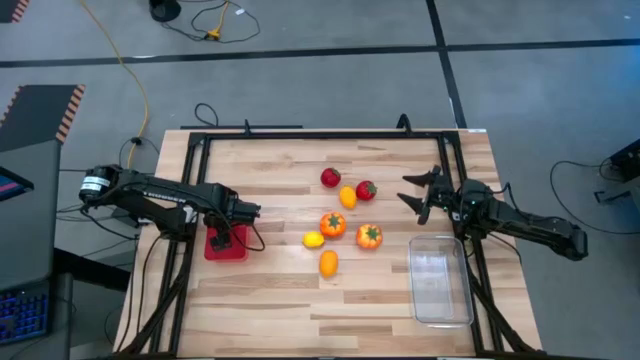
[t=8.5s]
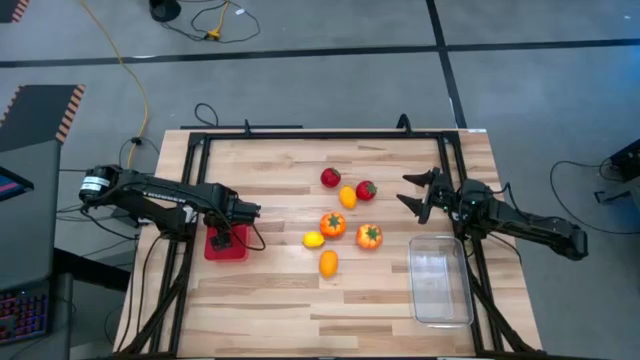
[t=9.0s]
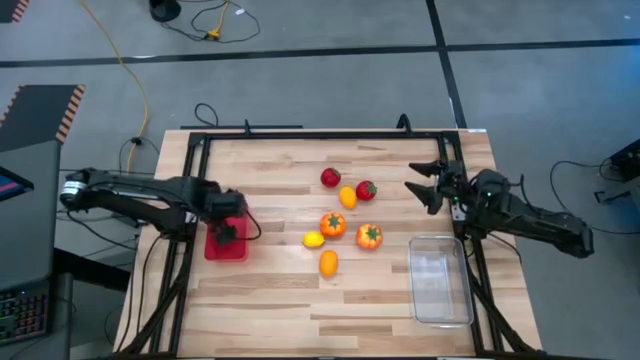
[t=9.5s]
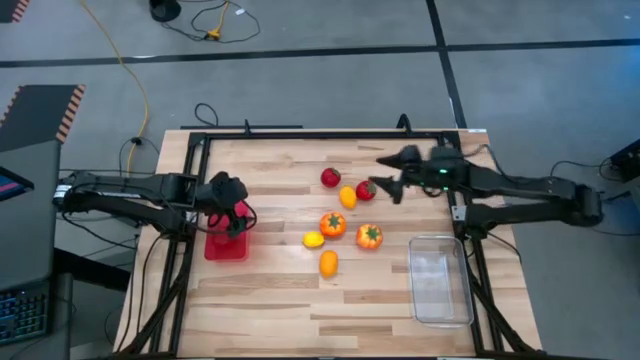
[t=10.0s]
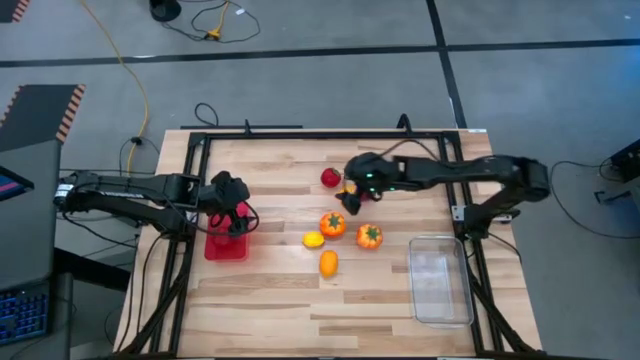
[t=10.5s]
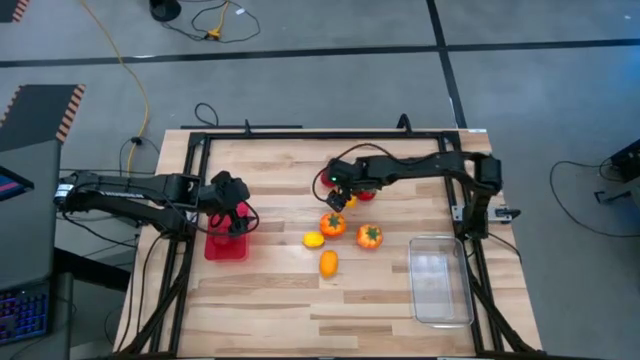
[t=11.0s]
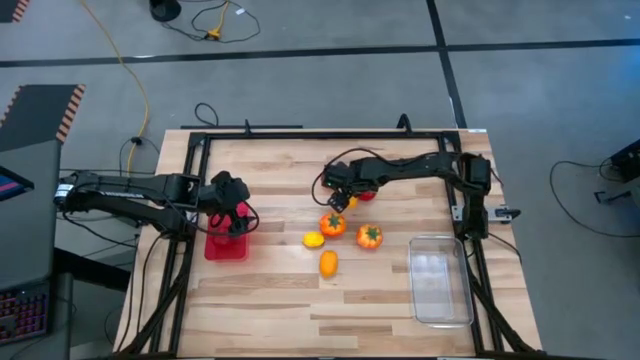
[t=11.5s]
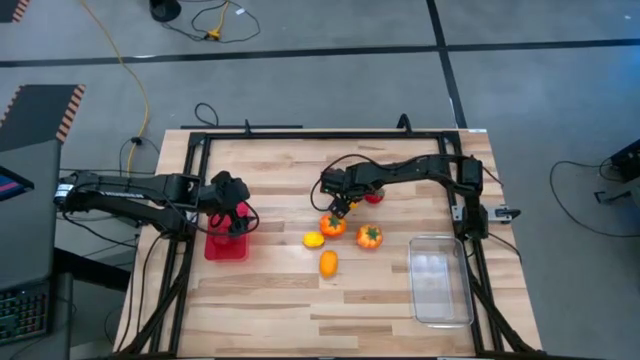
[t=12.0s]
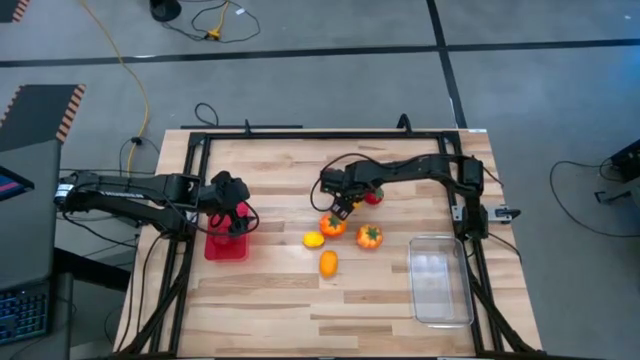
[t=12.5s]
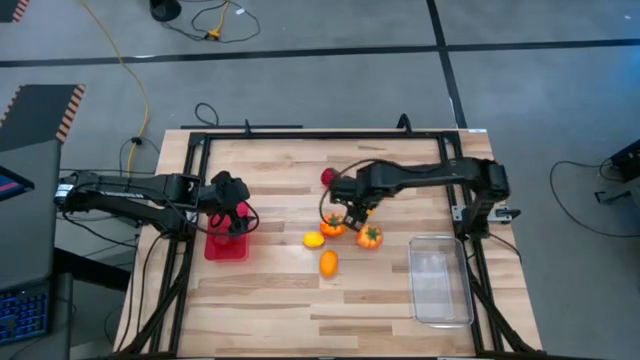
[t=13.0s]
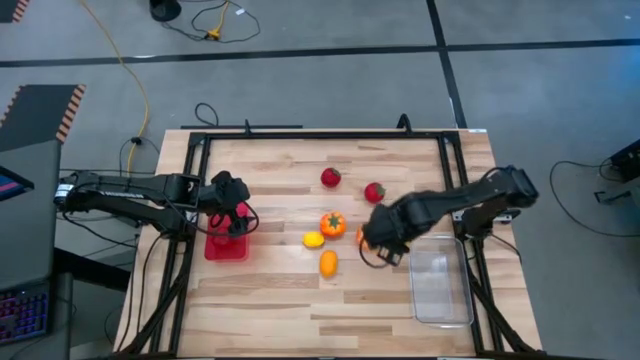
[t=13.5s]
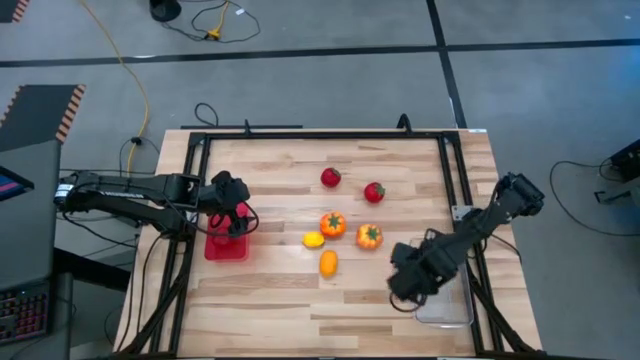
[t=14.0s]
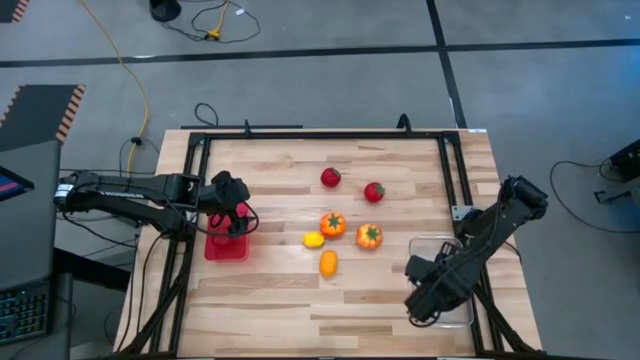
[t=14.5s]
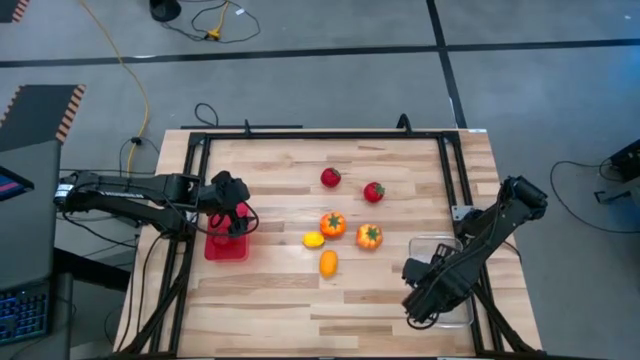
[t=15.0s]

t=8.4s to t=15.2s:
Task: Sort produce into baskets
Put the top yellow lemon into the transparent bin

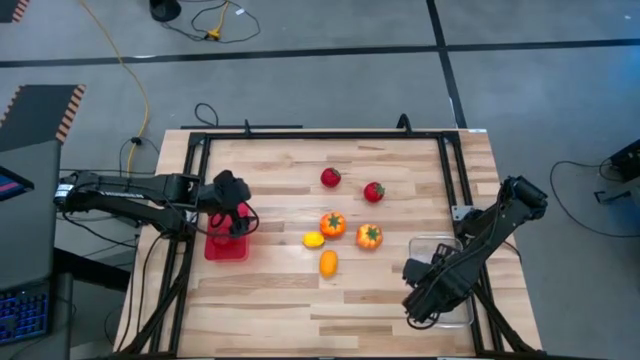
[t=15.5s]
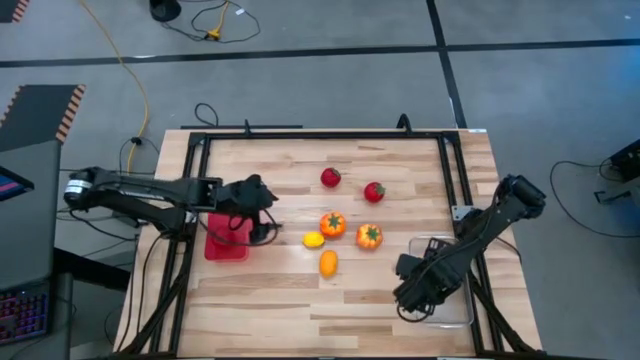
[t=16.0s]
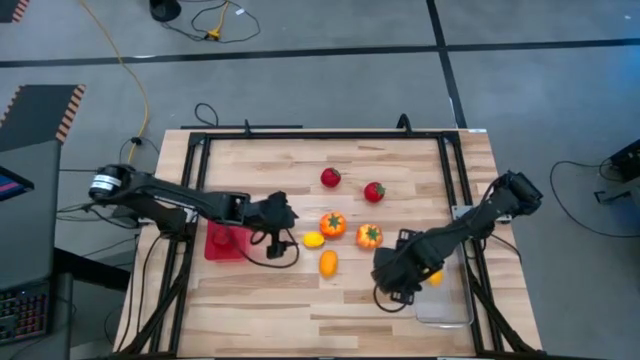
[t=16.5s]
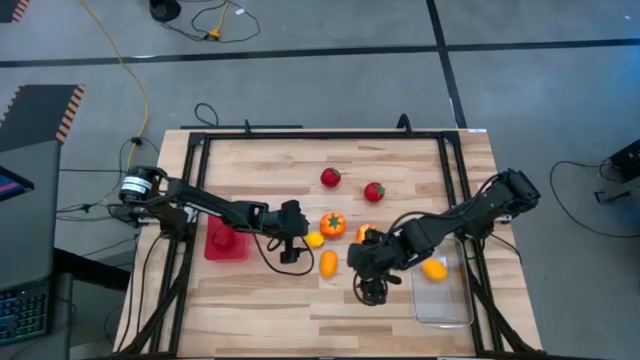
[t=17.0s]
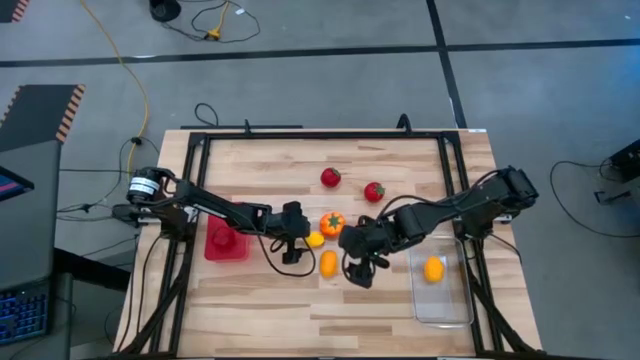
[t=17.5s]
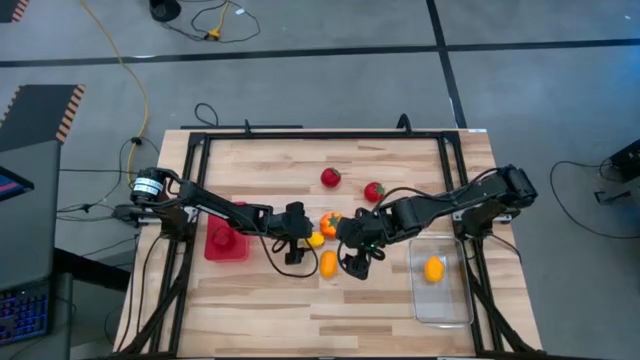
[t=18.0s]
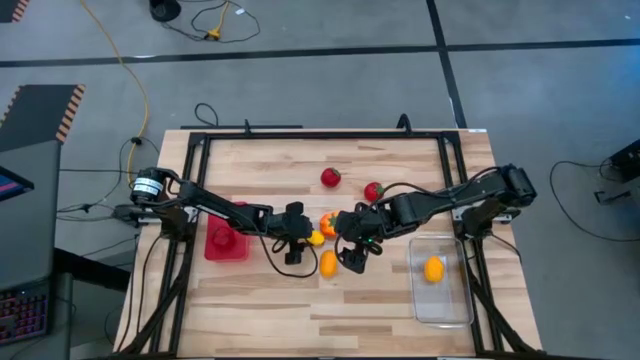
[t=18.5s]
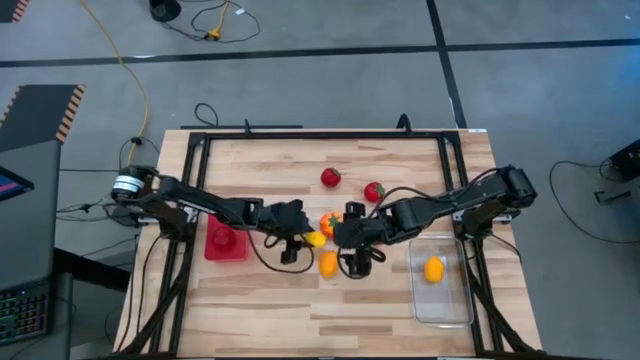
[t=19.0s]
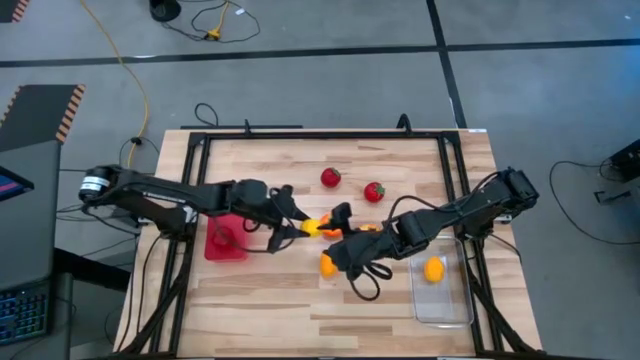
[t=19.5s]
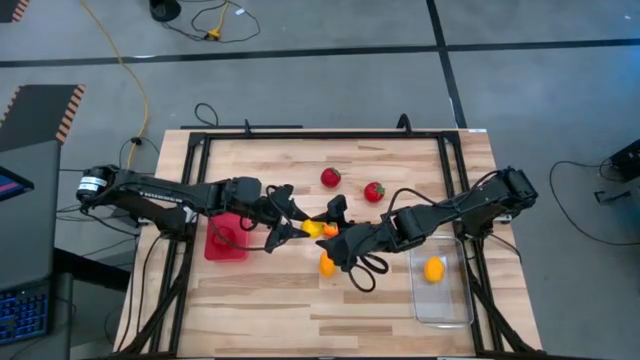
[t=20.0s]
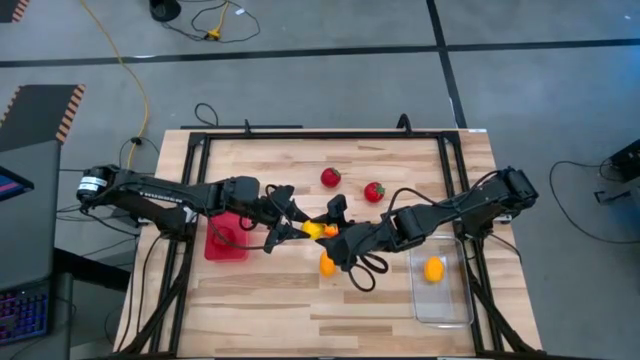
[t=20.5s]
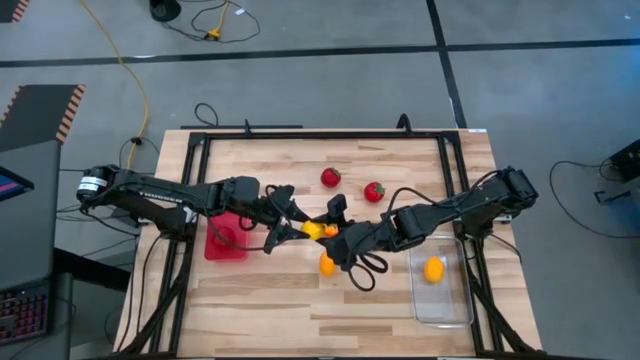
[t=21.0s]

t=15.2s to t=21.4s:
Put the yellow lemon into the transparent bin

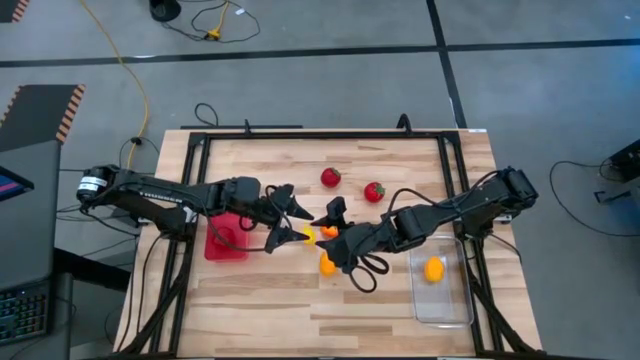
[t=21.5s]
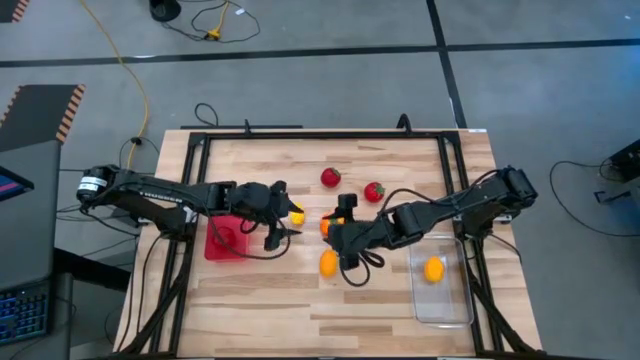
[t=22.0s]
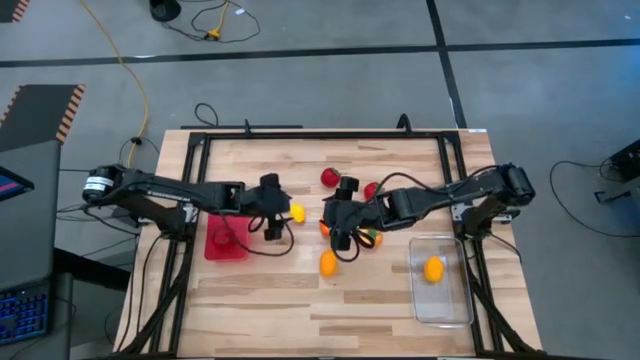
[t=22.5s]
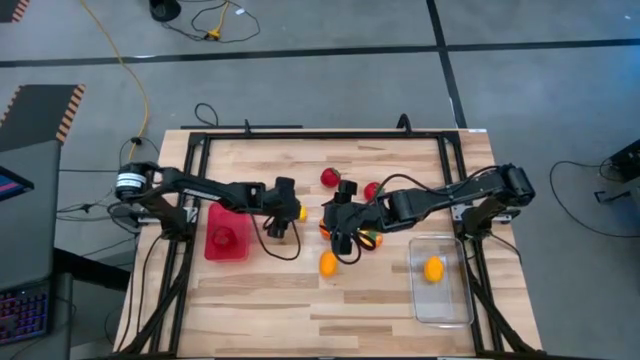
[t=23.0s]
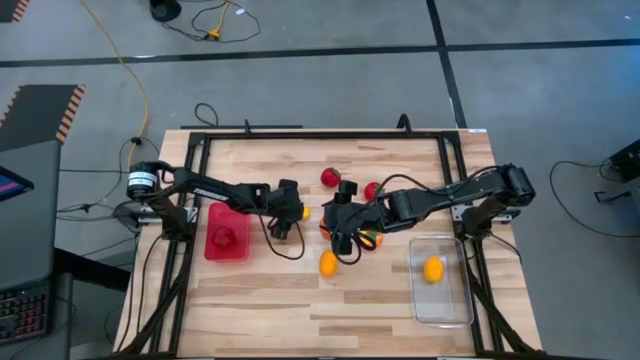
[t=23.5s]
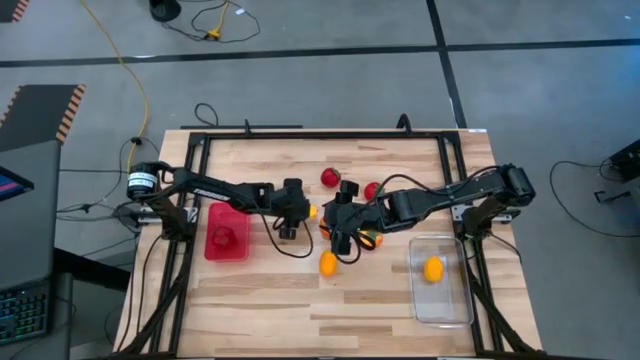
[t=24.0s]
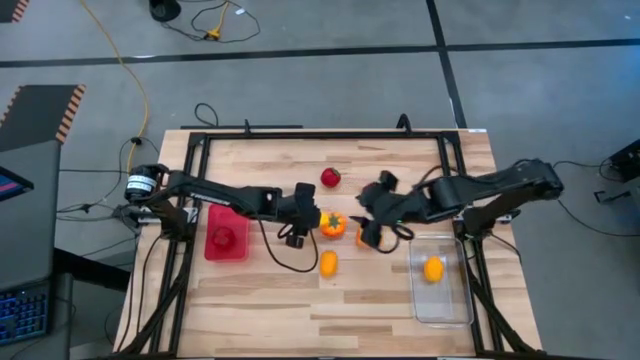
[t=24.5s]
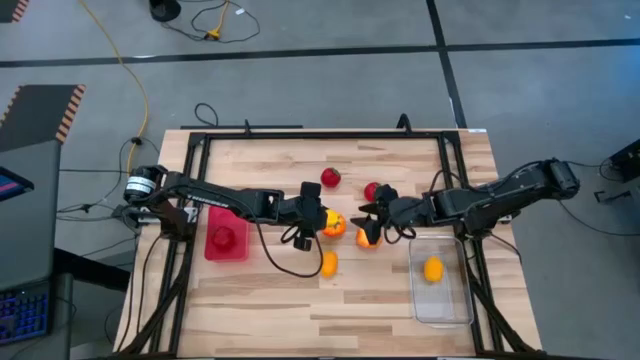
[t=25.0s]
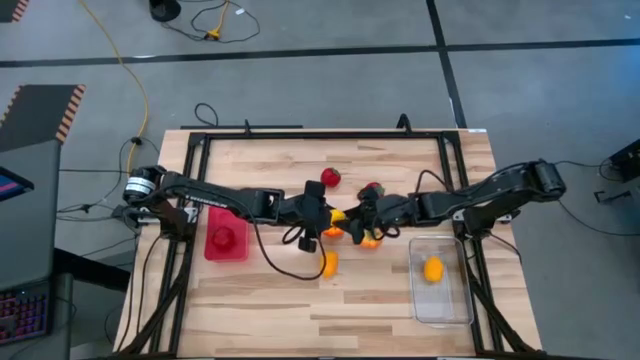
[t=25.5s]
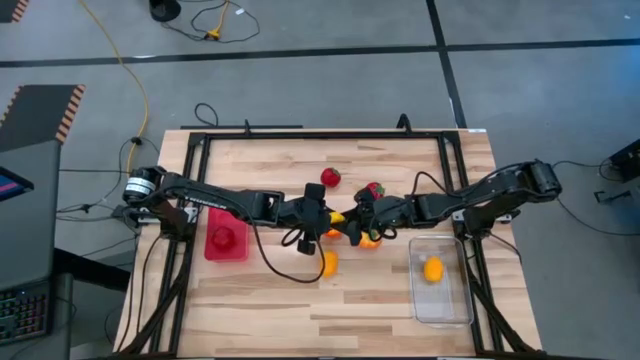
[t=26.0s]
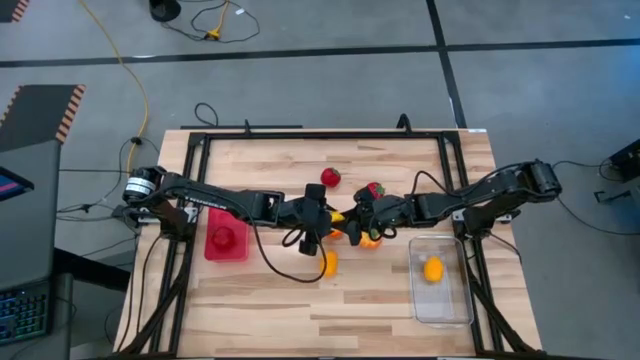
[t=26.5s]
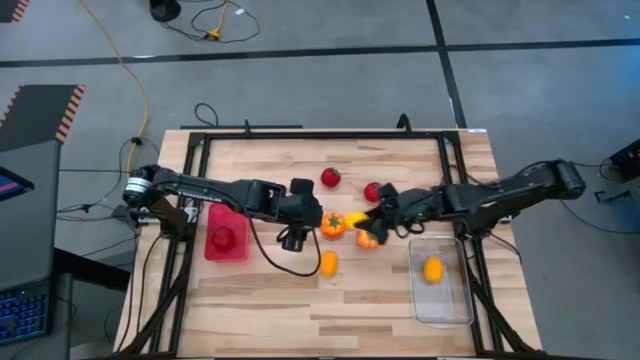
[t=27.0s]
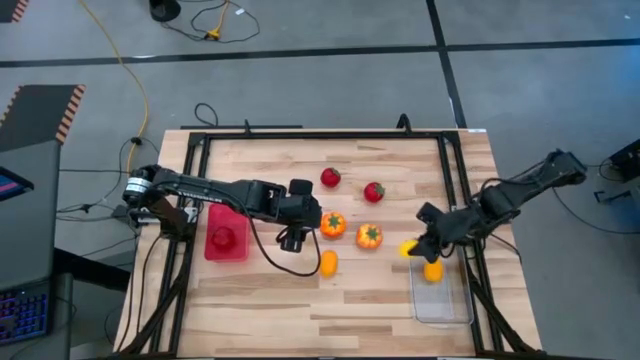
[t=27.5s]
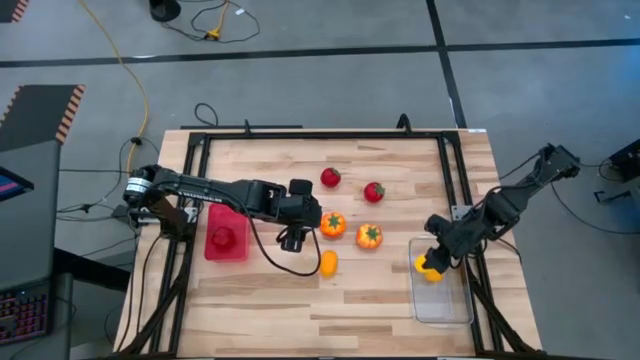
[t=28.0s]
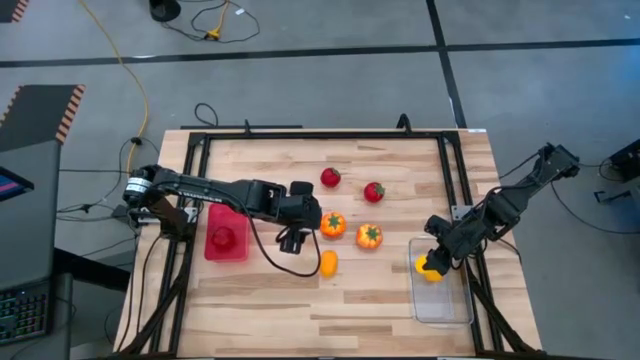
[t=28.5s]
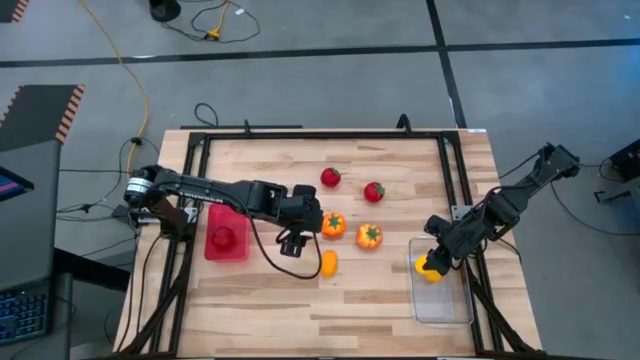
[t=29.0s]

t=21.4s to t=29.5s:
Put the yellow lemon into the transparent bin
